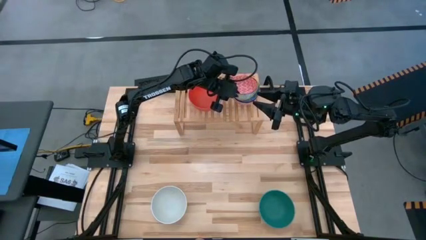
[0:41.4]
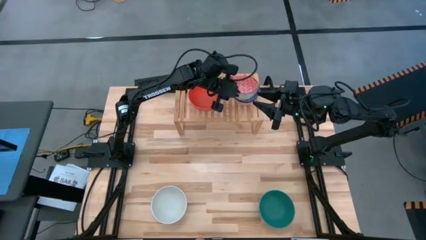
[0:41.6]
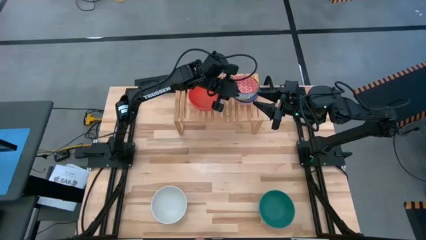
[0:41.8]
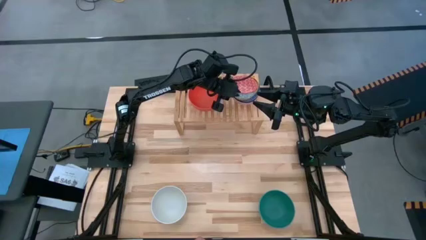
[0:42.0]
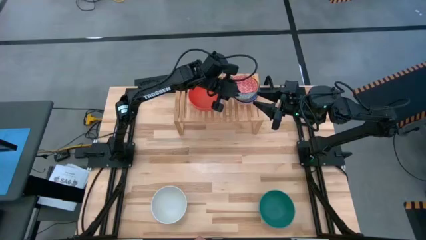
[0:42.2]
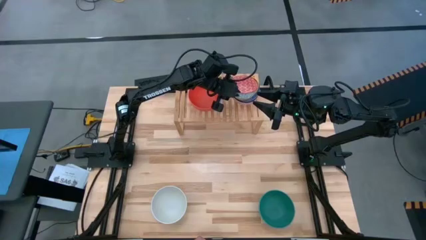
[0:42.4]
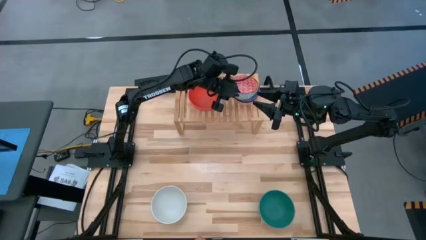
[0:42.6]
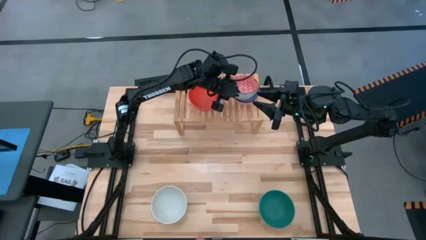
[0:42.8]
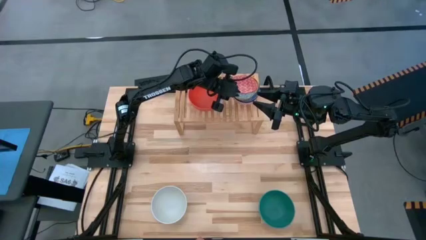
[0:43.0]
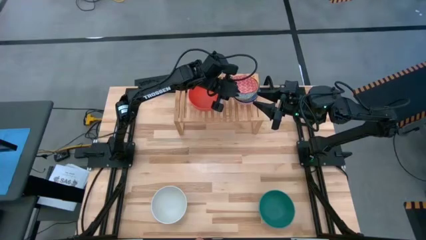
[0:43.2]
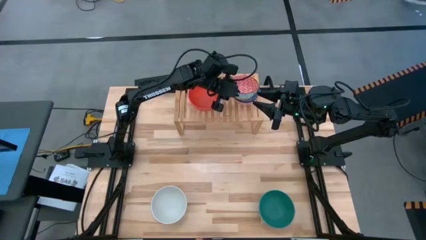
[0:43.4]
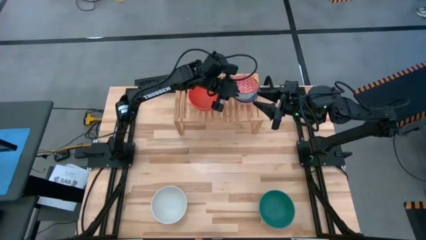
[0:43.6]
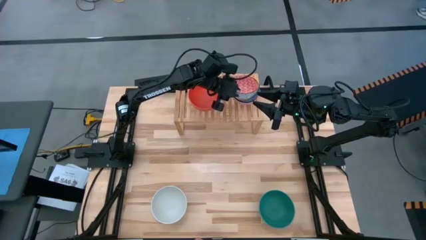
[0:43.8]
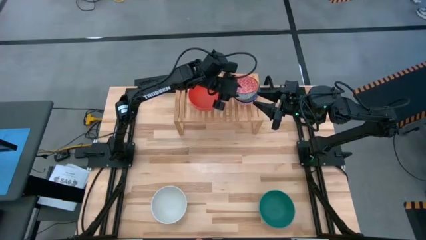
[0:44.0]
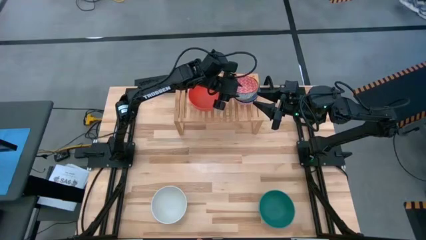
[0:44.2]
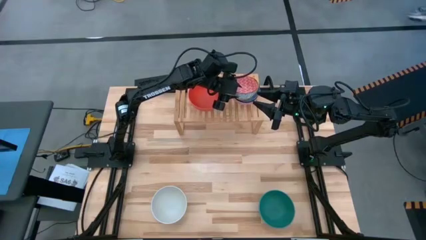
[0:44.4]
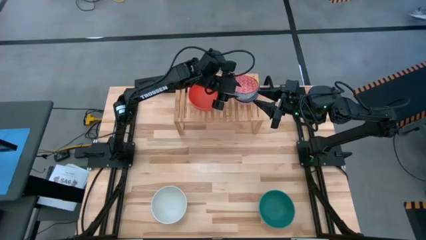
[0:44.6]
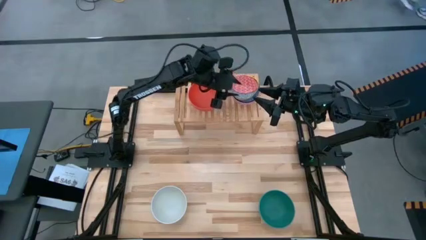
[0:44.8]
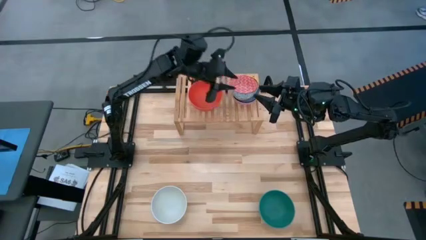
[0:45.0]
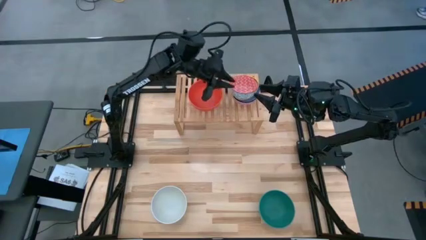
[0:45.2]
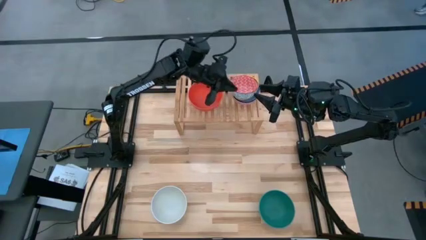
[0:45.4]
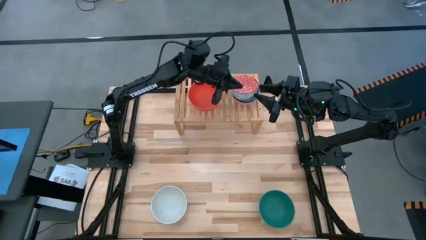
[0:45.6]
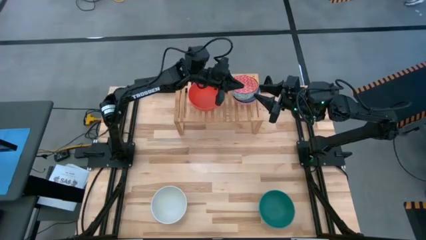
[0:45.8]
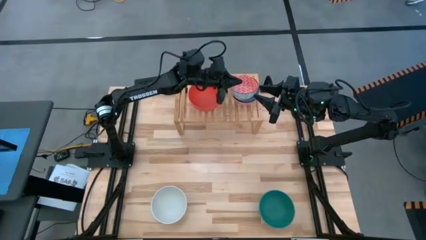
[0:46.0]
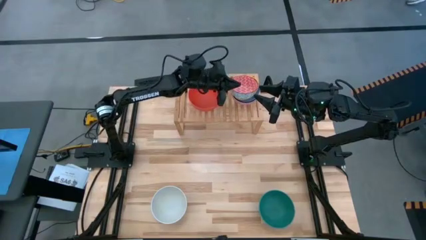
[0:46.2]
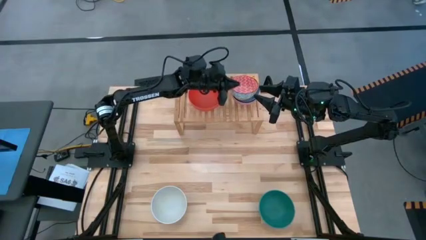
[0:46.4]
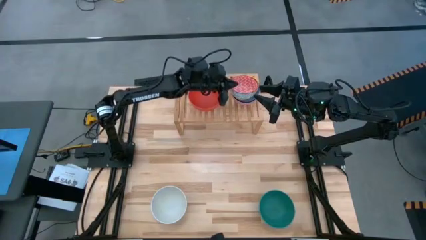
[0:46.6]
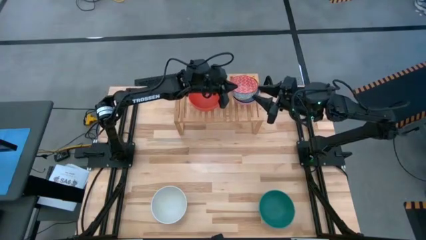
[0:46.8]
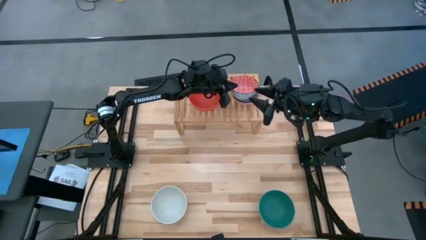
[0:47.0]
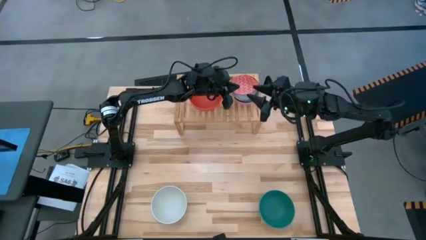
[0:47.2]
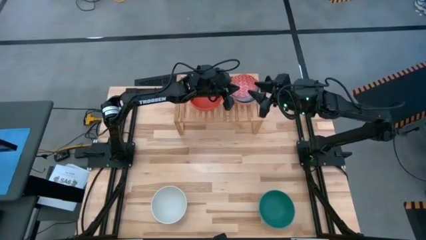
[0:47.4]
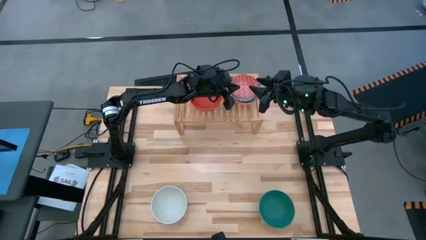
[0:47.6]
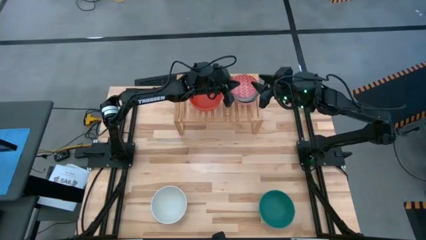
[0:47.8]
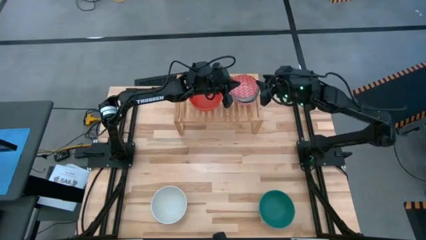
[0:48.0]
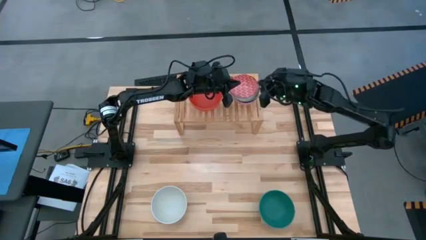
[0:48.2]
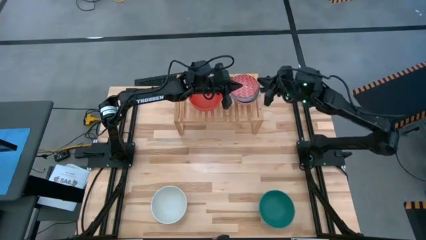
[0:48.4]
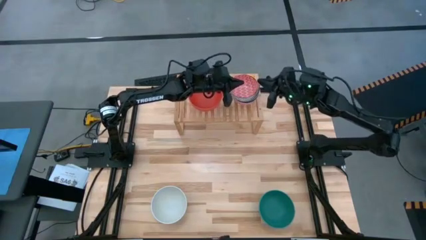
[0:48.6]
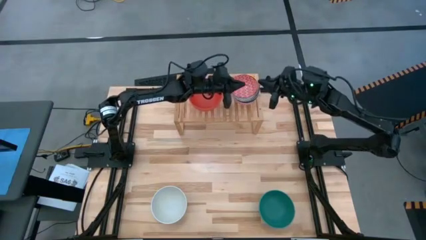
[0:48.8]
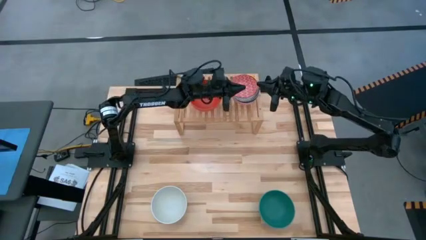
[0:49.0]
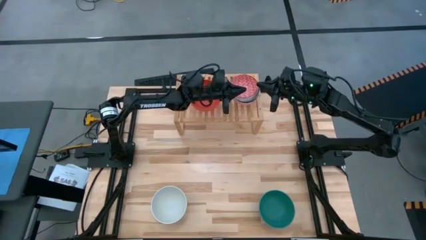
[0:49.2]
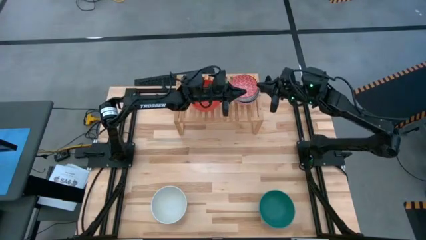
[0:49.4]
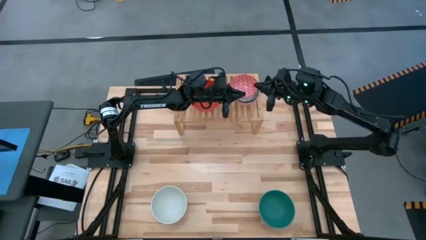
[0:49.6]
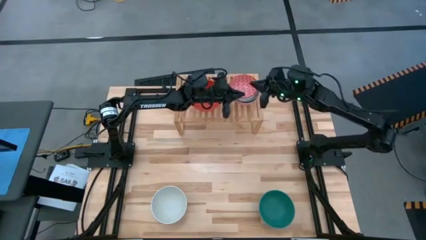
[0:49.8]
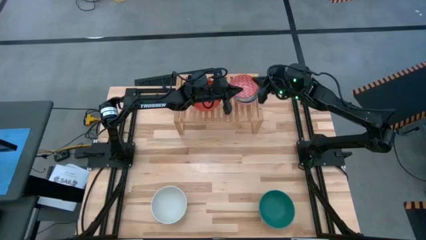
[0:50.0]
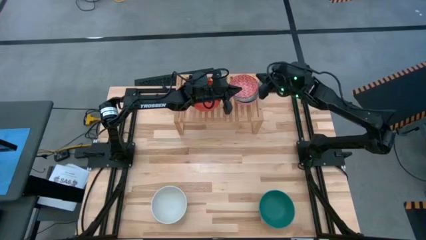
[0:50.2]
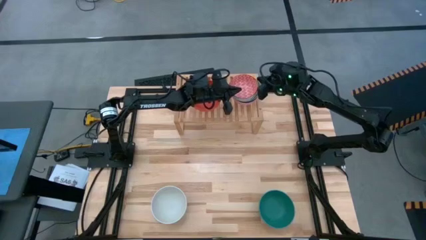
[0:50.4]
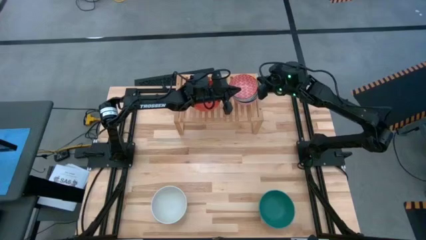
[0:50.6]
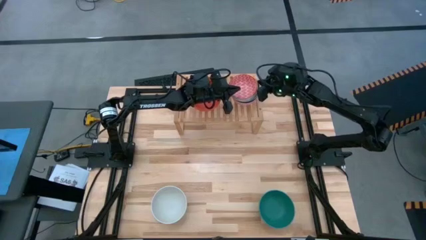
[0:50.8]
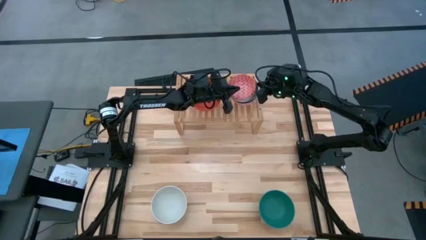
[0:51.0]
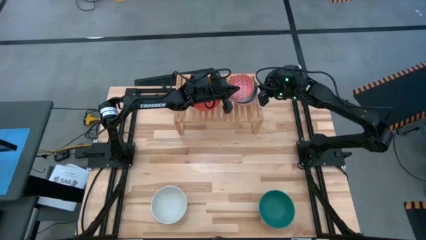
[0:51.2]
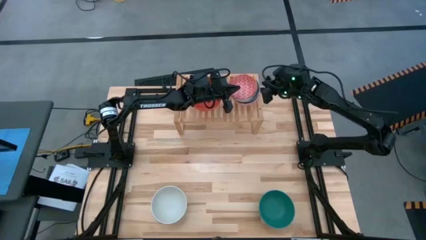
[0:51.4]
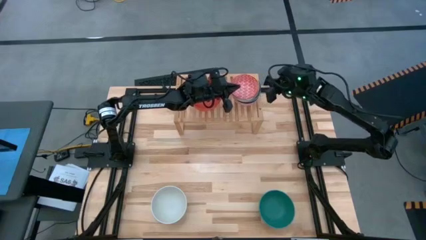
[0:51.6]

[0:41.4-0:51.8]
Task: Place and stack bowls onto a shelf
Stack the small red bowl on top of the other small yellow bowl on the shelf

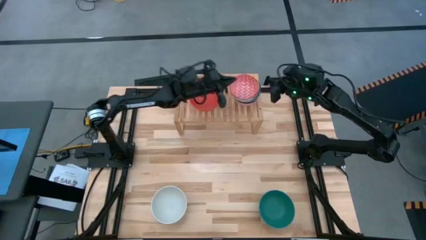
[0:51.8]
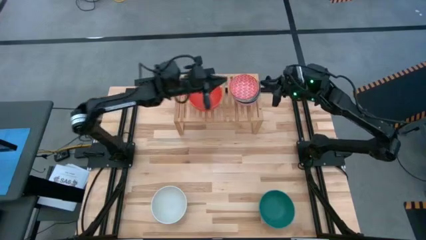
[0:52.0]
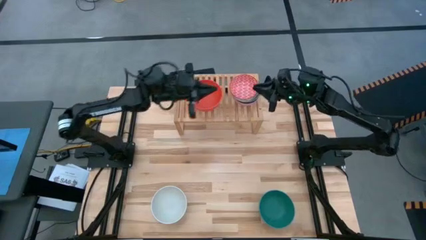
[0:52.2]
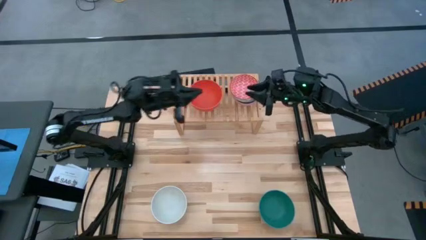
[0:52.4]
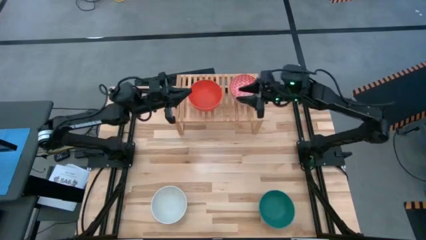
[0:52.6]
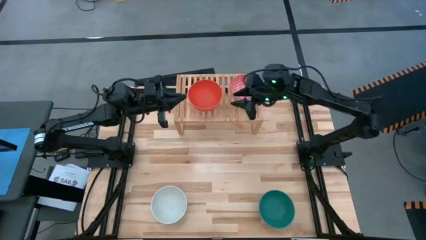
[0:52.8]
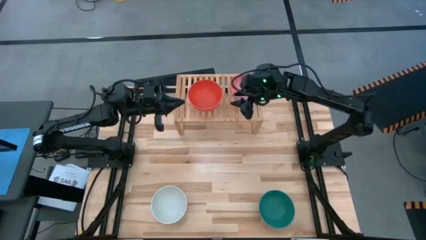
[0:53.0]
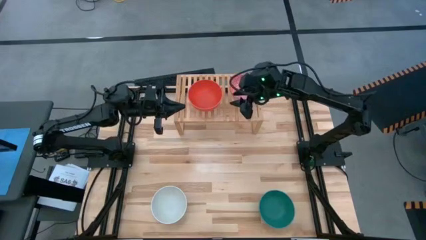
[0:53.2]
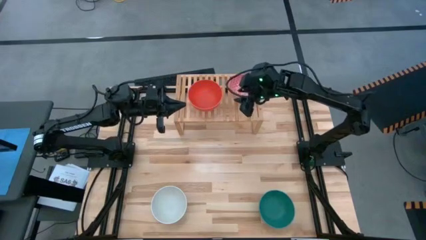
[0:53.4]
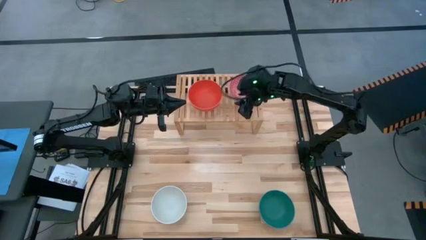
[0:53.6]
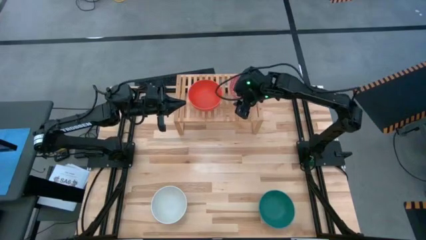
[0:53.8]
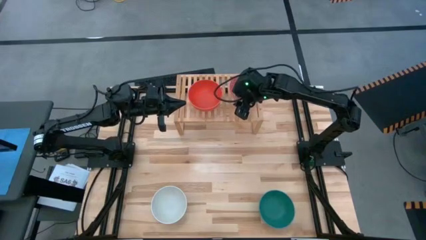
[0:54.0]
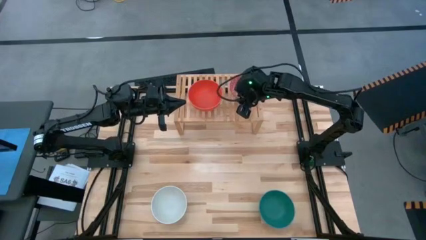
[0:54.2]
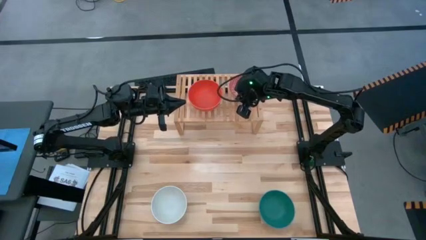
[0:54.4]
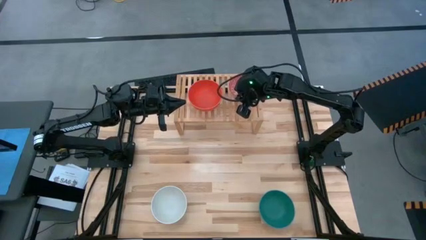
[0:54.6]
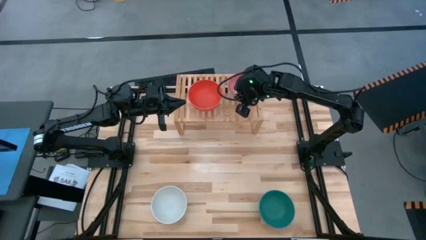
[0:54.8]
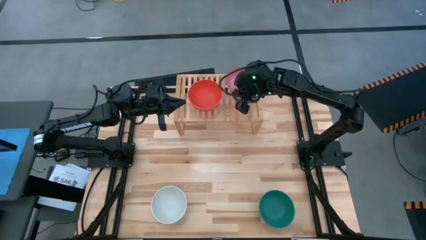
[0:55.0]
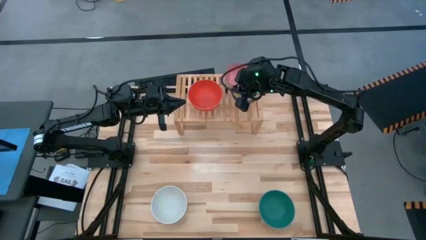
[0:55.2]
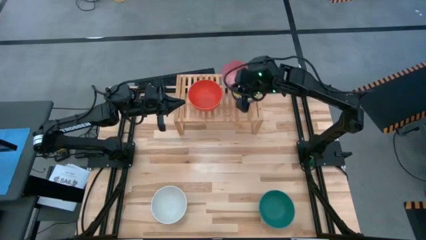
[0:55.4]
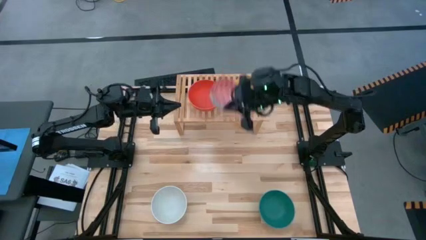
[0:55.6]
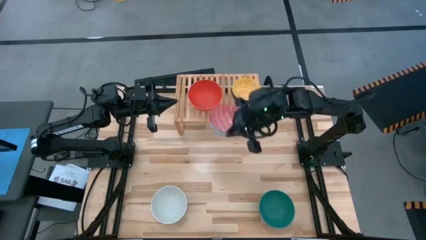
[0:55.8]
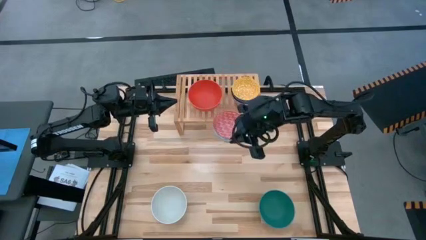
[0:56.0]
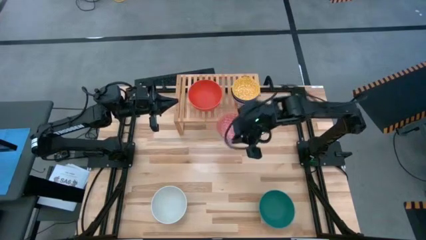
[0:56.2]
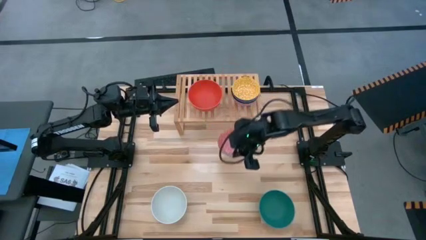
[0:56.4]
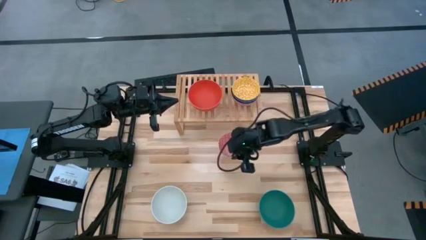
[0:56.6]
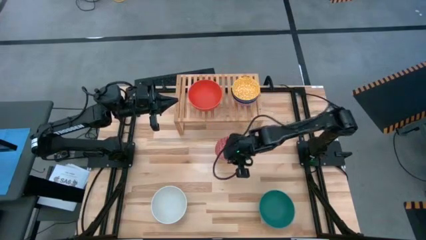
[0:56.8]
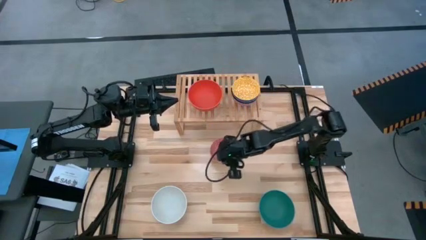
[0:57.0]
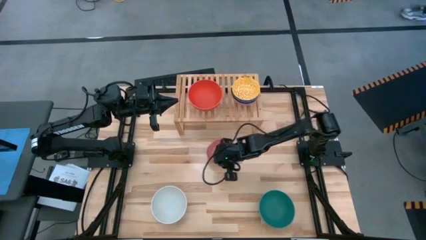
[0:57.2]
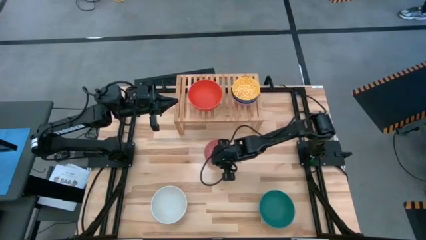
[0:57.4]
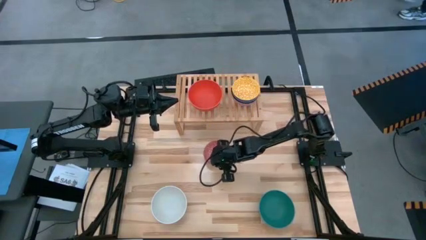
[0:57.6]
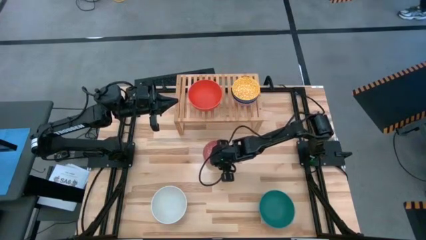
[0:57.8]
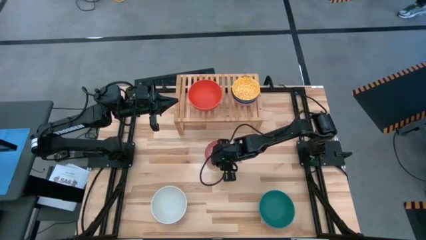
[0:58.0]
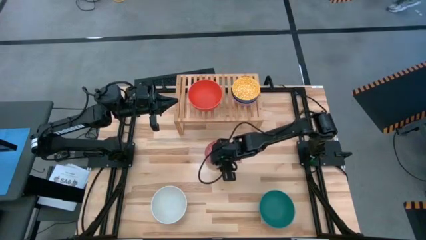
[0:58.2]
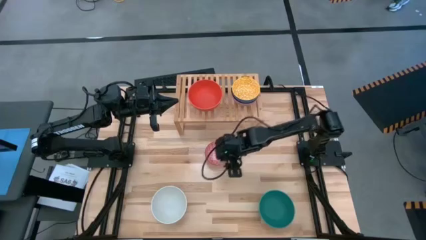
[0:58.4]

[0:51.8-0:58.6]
Remove the small red bowl from the stacked small bowls on the shelf
